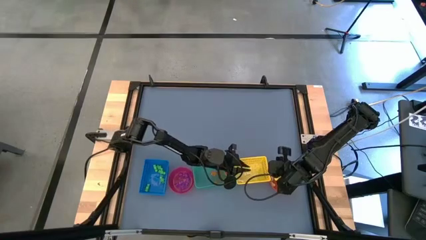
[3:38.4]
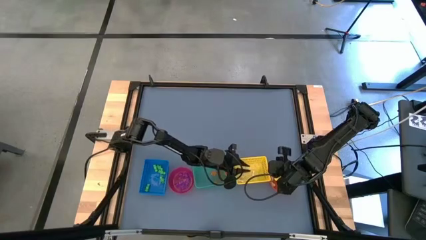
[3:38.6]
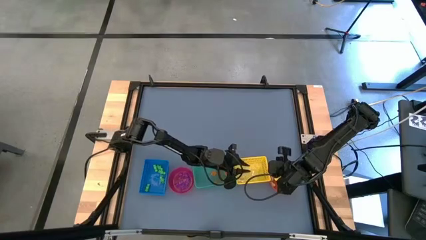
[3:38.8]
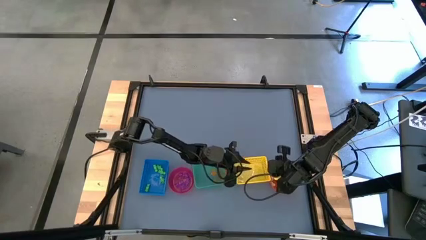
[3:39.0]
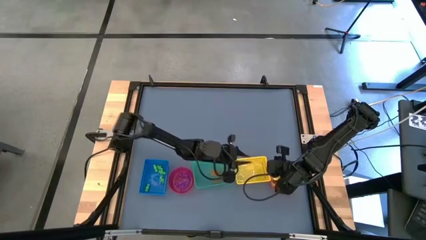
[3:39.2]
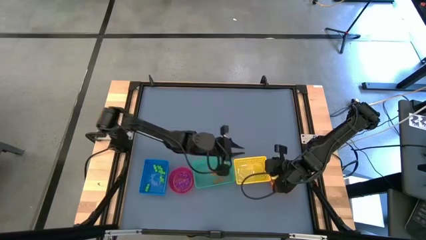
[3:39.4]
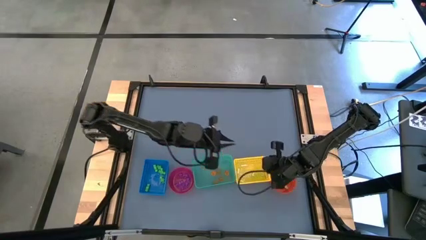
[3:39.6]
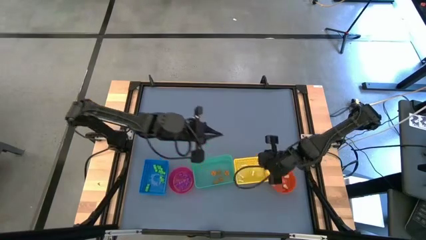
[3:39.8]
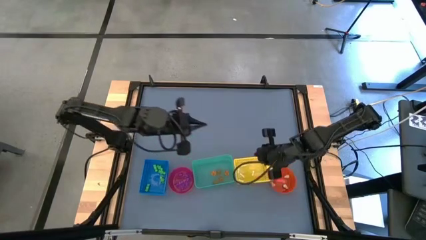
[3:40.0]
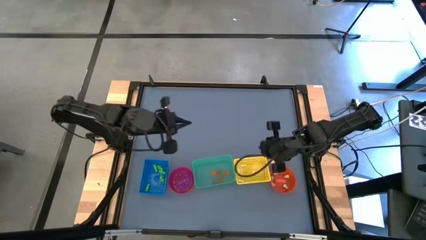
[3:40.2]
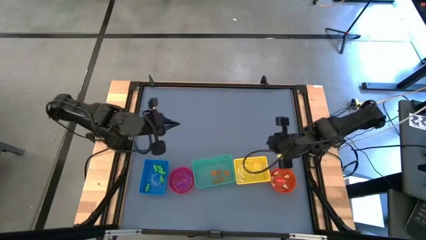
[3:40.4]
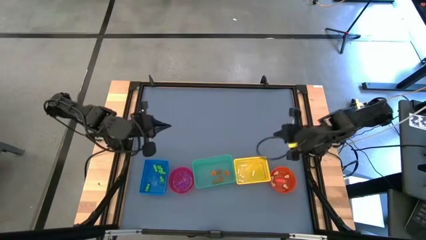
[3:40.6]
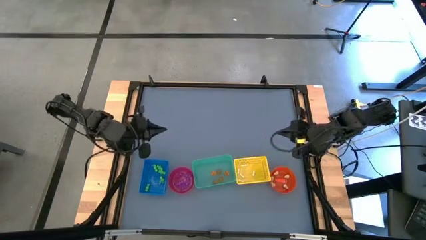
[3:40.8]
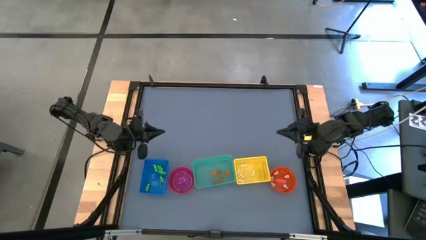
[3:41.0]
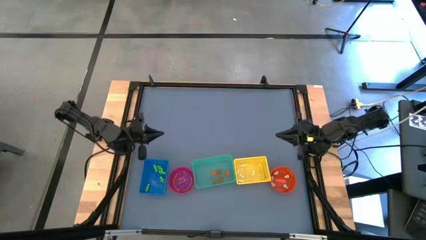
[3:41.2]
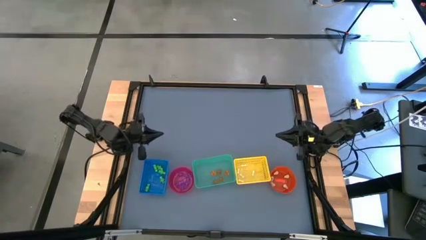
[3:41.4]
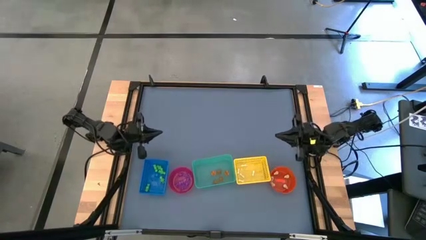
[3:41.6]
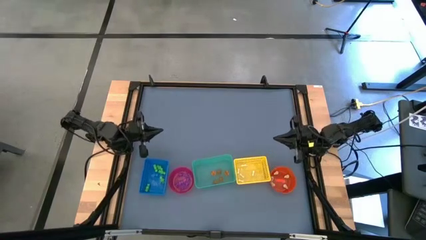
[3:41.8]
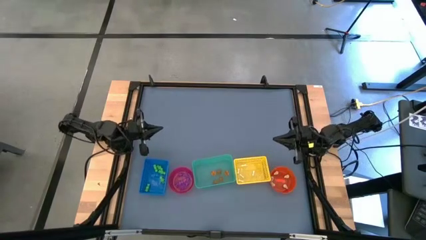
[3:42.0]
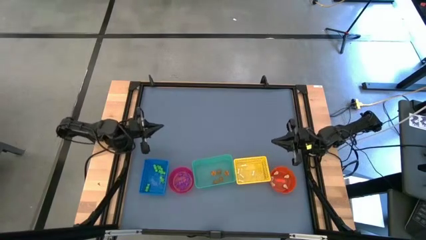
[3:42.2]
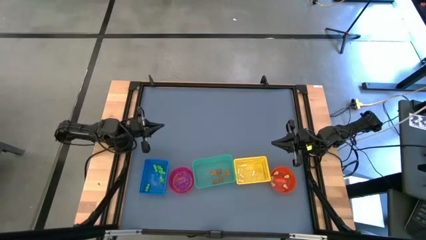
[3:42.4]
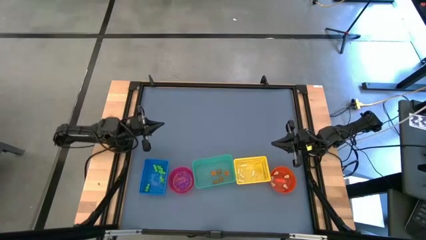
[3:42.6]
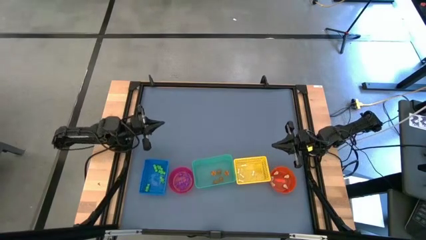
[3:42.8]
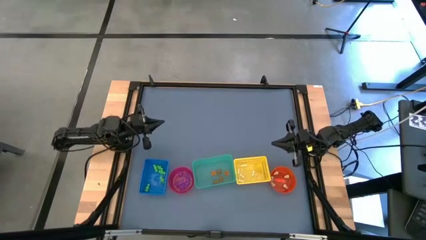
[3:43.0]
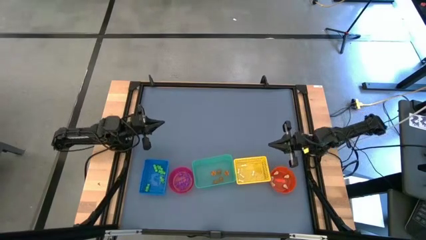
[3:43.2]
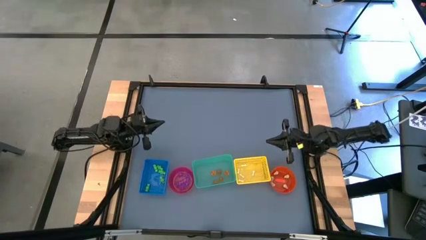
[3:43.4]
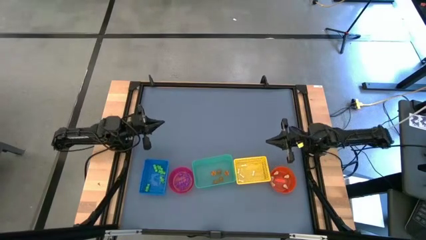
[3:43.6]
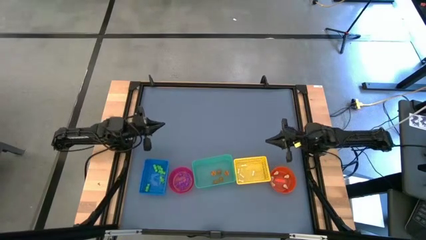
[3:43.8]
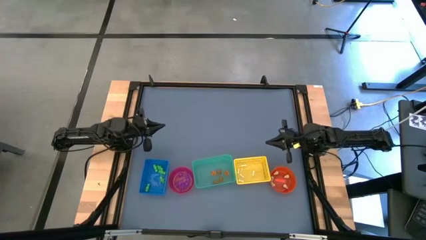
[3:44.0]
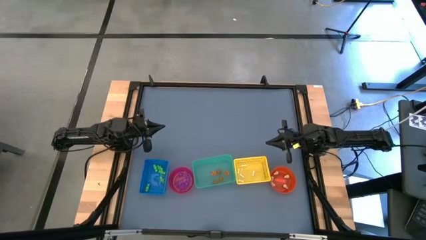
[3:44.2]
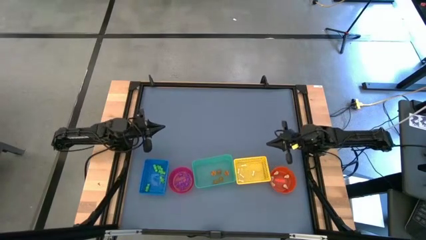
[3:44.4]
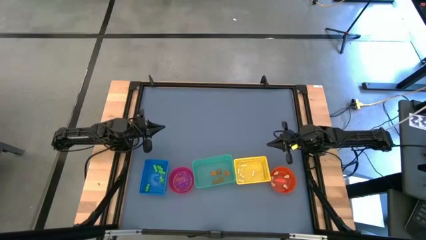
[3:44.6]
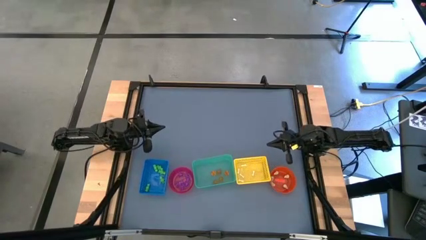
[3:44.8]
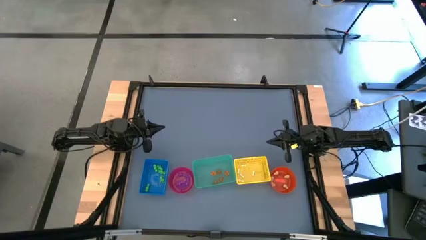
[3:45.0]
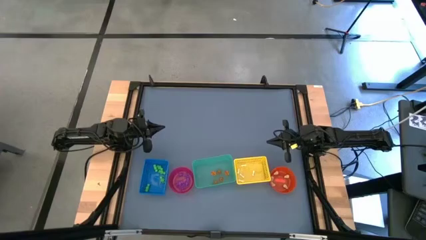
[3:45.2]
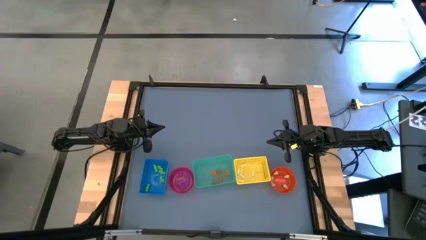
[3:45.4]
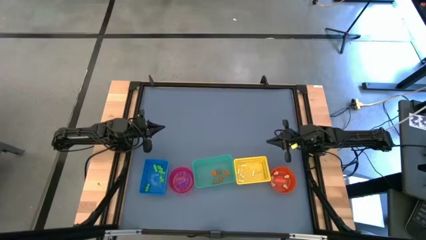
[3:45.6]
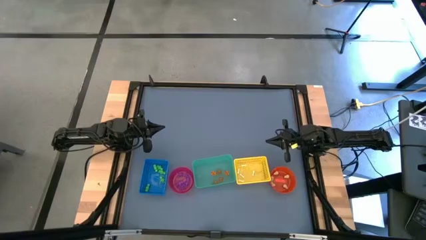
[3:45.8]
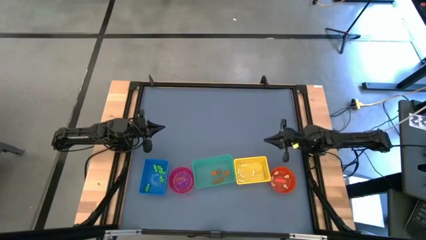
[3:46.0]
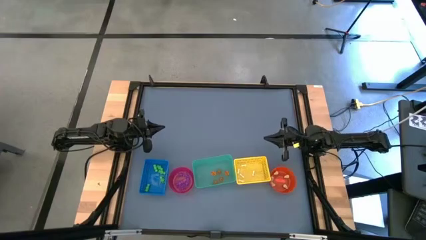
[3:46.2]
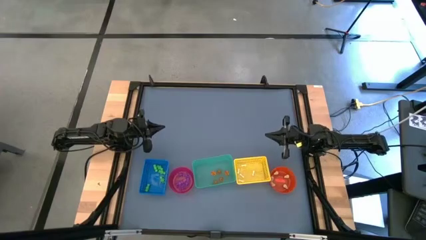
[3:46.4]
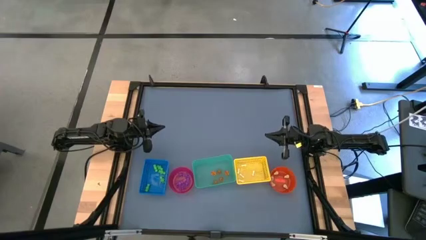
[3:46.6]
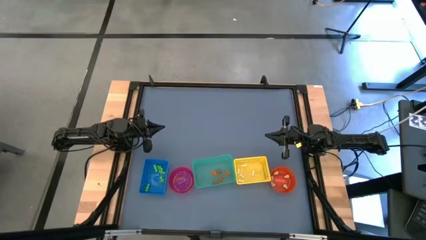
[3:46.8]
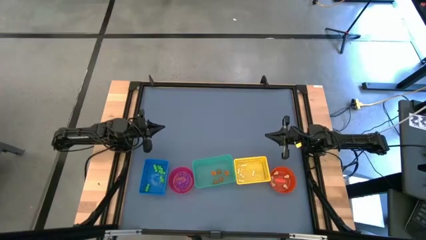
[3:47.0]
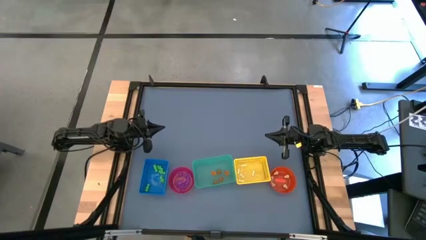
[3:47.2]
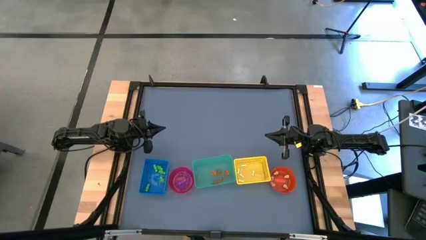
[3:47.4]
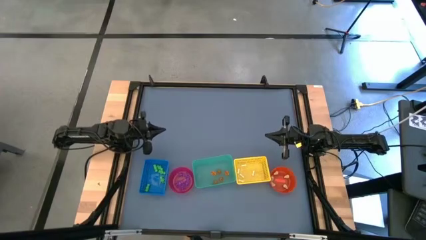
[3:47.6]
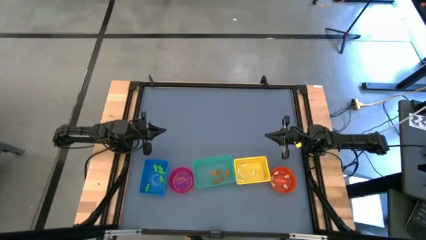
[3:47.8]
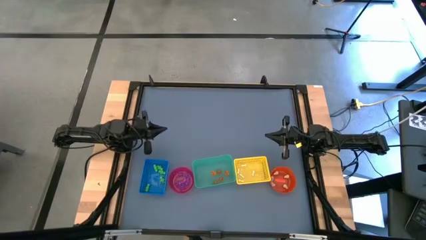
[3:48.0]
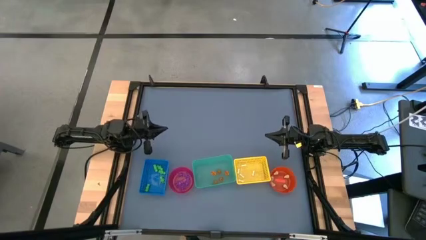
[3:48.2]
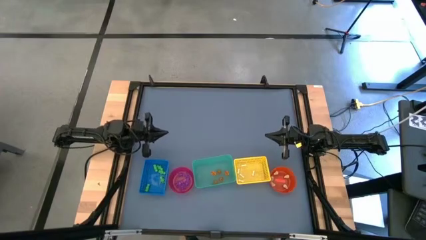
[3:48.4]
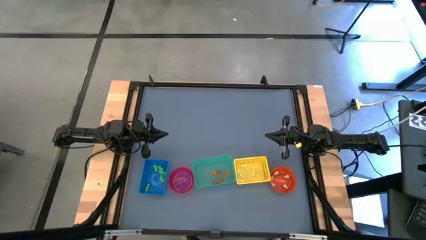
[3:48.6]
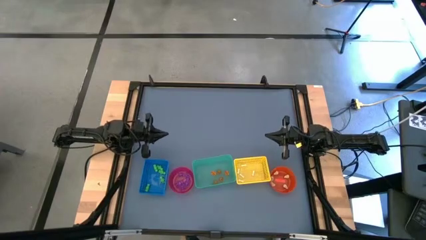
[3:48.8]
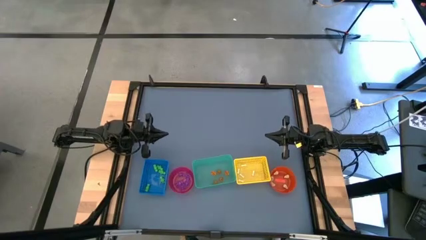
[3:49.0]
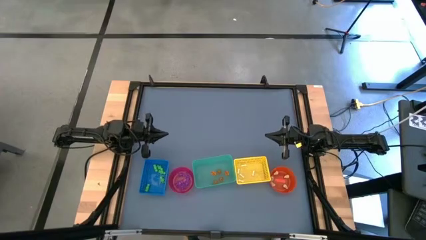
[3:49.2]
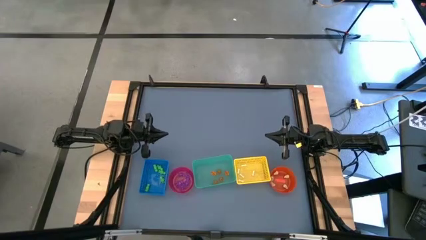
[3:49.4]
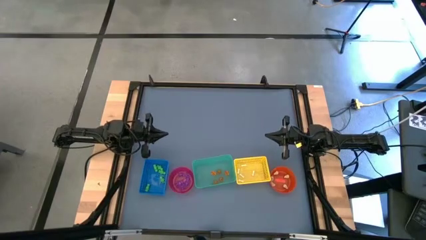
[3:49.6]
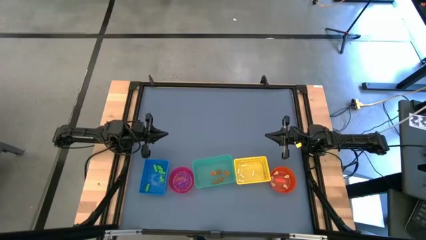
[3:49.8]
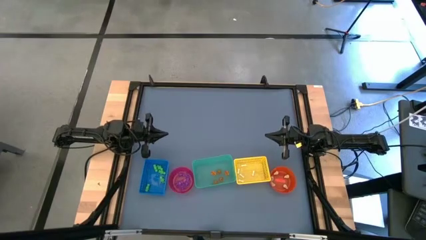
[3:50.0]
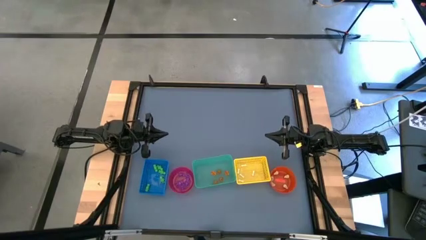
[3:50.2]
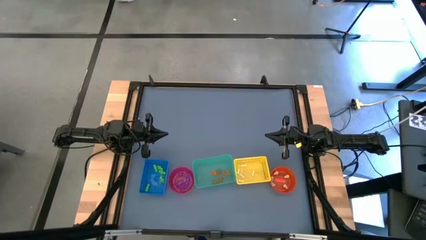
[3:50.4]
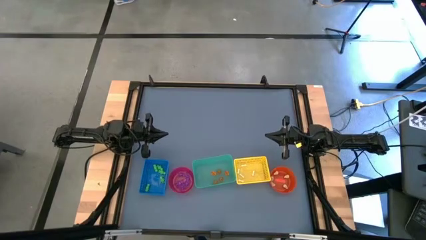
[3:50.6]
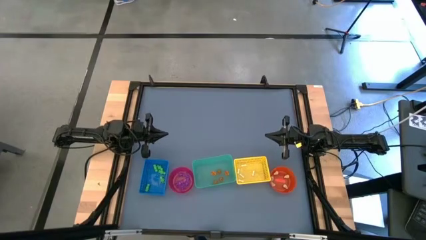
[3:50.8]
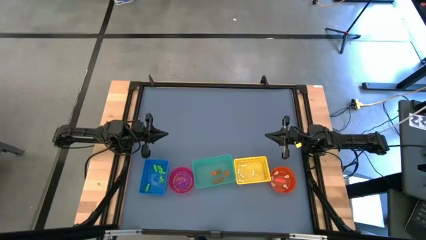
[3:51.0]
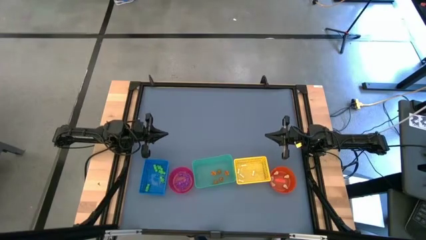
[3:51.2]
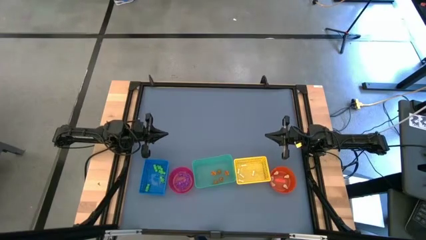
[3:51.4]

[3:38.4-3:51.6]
Task: Sort Halloween decoration
Return to Home Position

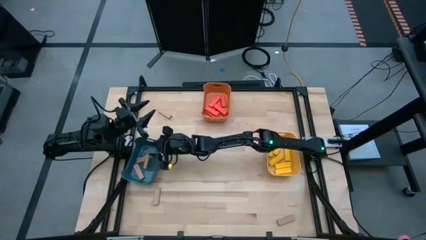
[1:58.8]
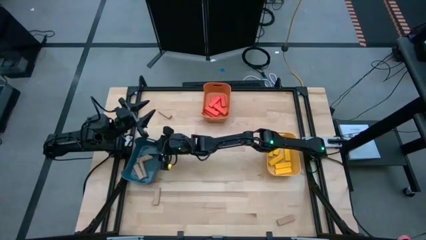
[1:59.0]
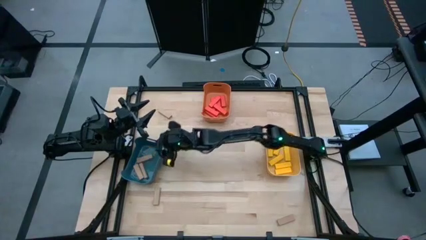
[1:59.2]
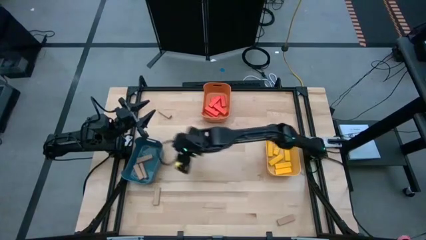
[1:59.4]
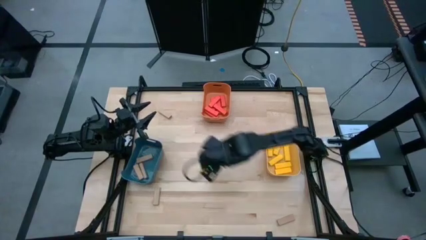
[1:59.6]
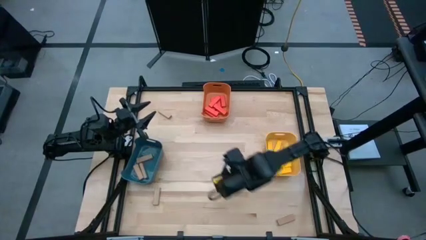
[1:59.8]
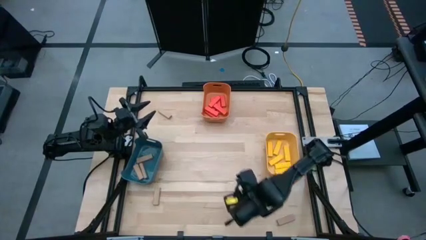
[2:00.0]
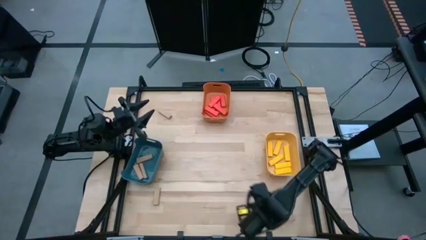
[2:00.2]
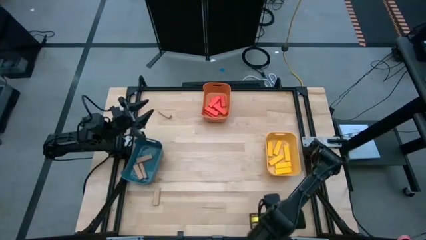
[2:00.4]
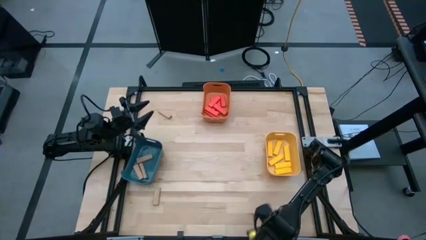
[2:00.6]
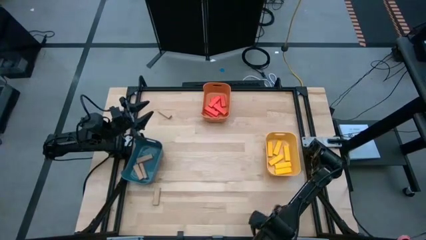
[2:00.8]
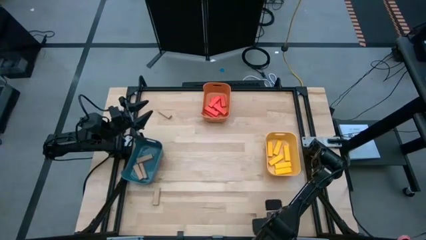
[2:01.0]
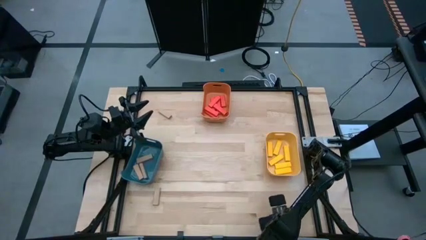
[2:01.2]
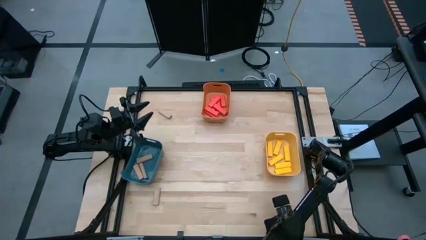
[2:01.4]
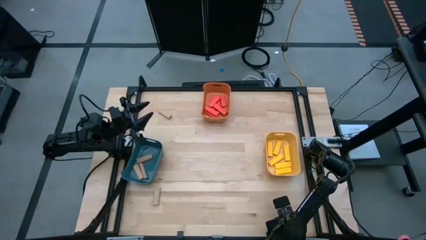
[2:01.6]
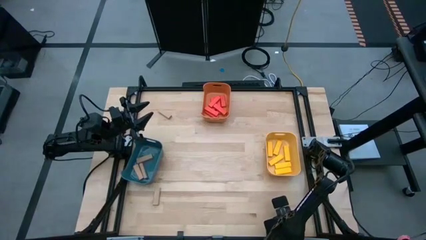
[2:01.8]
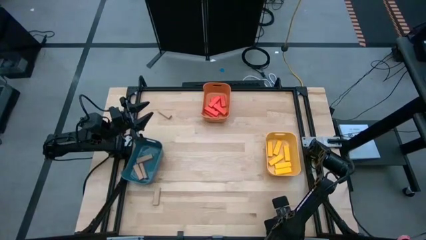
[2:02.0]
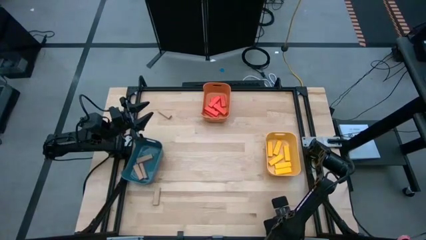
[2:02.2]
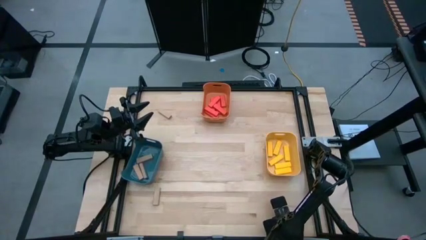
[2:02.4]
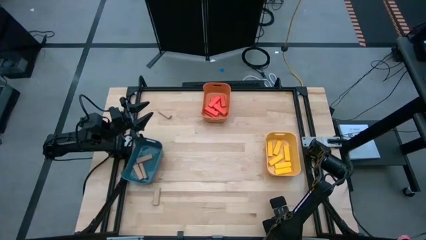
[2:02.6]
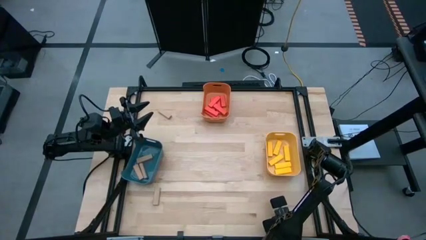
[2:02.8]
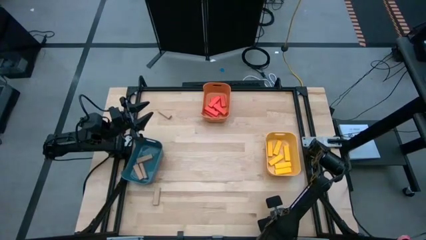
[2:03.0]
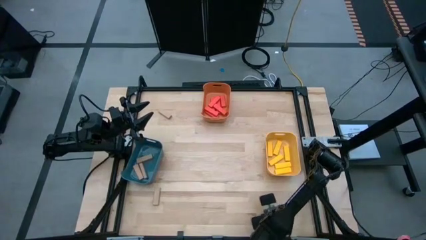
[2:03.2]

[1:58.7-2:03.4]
Task: Sort blocks
Put the bottom right brown block into the blue bin
